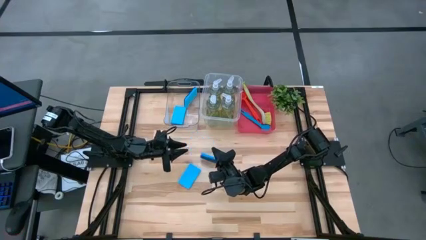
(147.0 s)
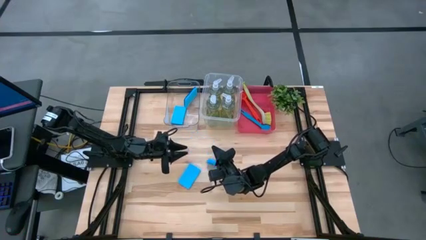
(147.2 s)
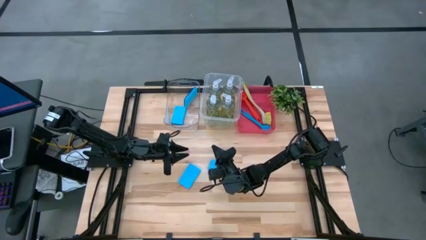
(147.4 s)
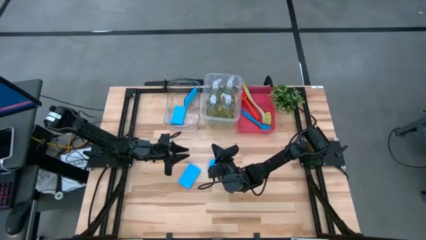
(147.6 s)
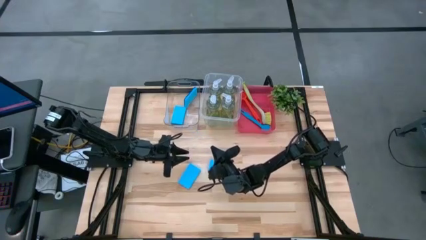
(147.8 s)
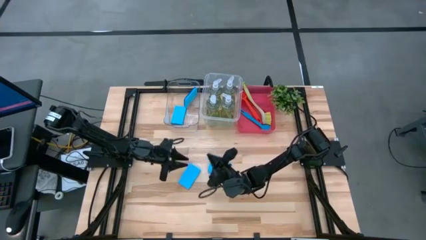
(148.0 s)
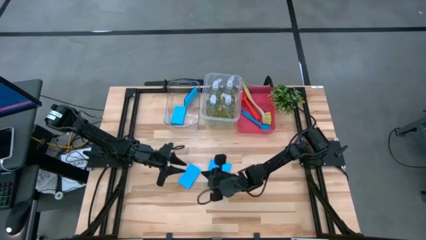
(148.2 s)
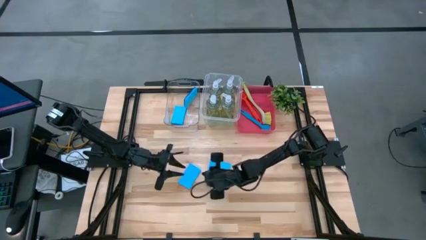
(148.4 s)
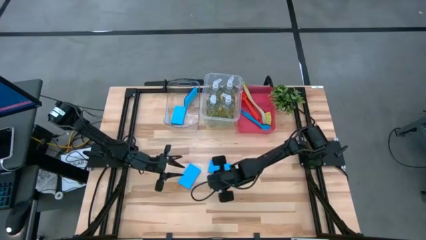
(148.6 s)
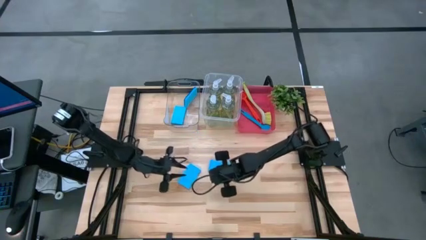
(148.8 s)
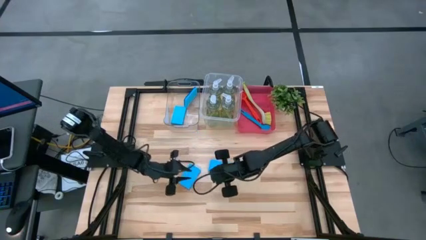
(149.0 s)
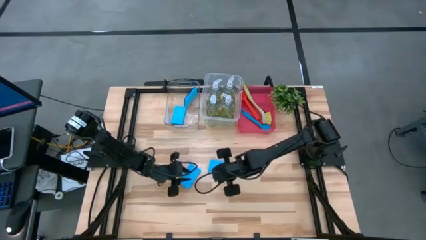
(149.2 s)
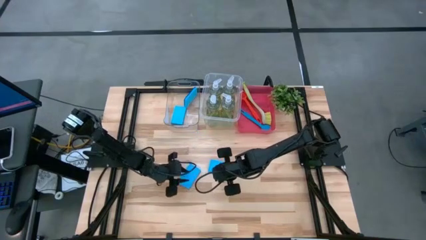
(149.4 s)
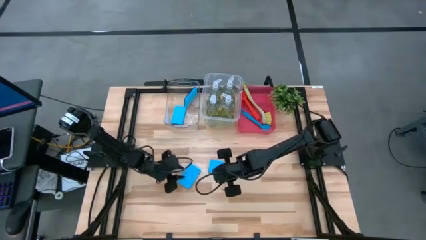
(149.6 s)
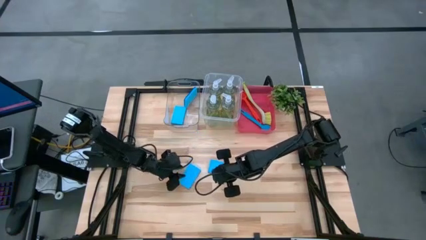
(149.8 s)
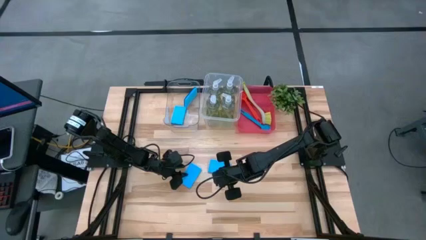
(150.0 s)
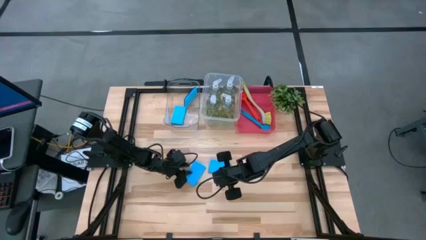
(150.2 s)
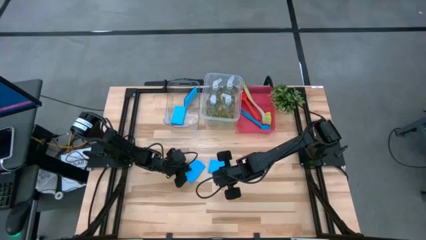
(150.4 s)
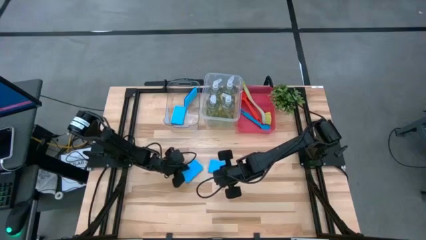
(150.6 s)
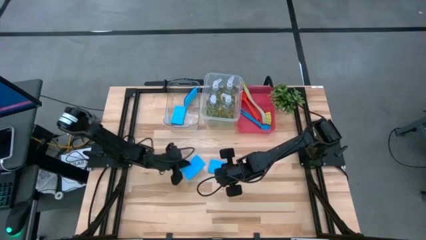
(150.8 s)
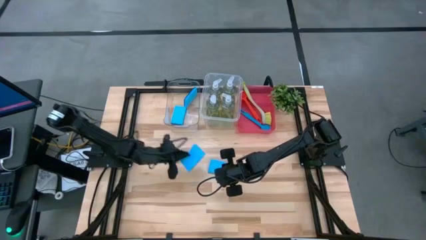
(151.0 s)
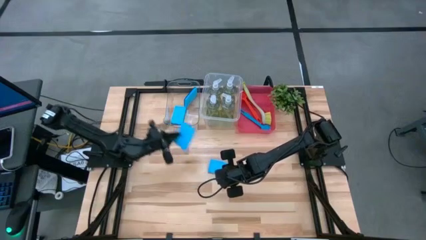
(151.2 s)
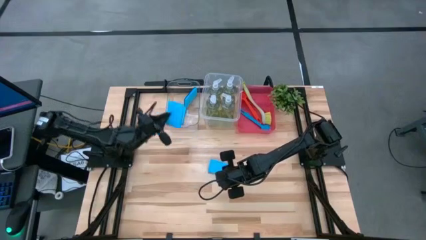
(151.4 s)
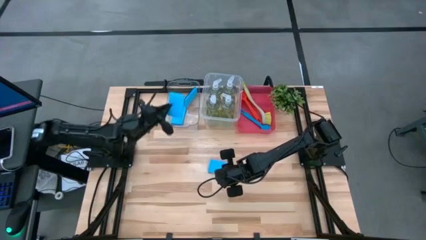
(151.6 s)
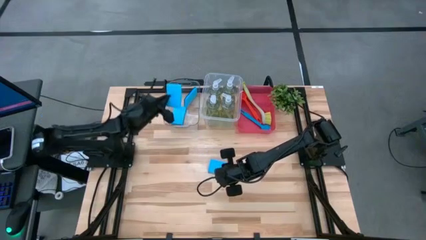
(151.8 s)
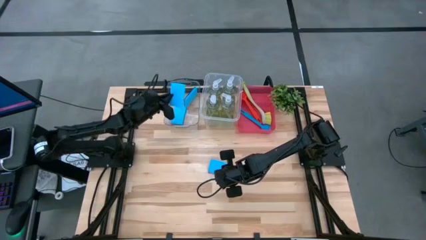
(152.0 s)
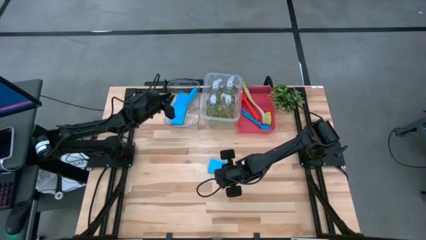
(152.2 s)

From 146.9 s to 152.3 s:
Task: Pick & Place Kitchen Sink Supplies
Put the blue sponge into the transparent bin

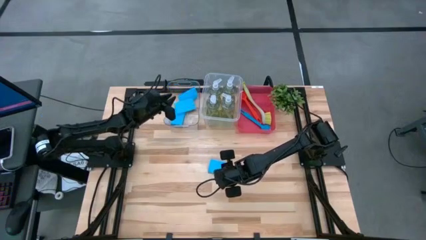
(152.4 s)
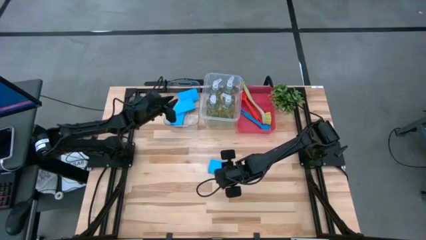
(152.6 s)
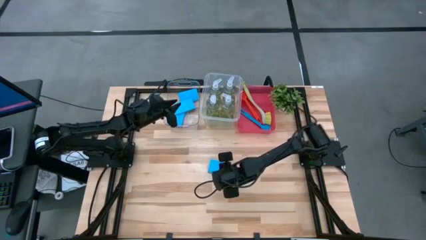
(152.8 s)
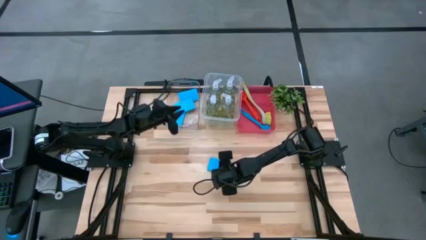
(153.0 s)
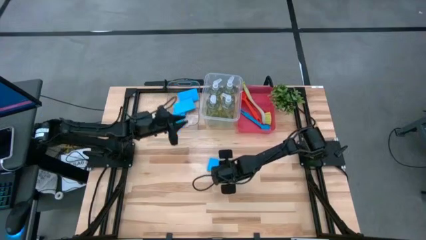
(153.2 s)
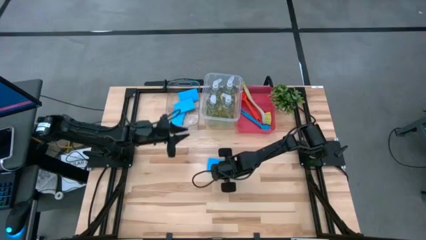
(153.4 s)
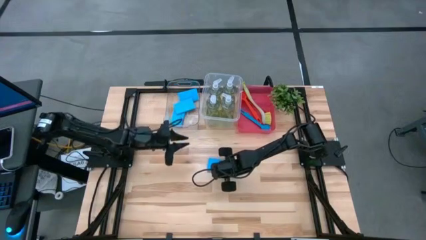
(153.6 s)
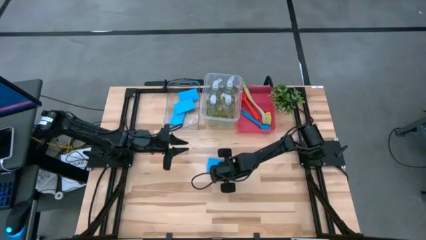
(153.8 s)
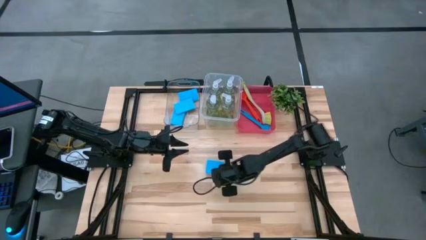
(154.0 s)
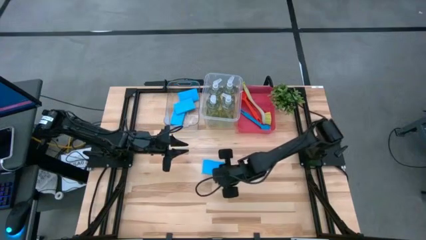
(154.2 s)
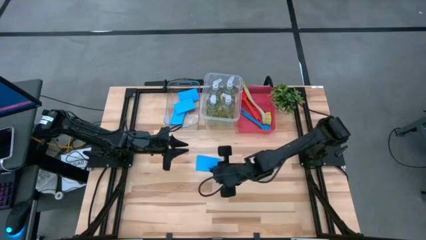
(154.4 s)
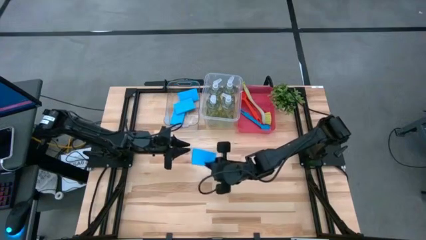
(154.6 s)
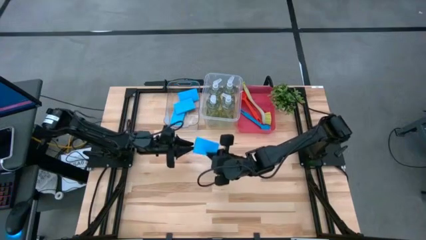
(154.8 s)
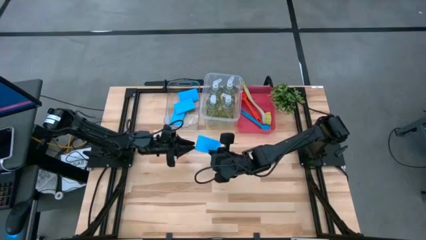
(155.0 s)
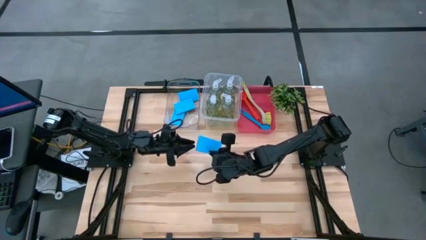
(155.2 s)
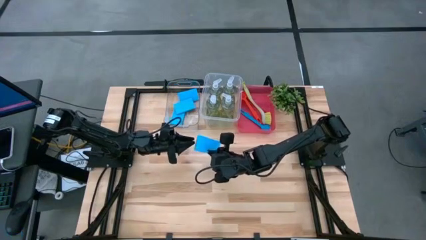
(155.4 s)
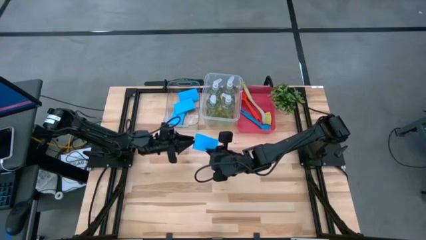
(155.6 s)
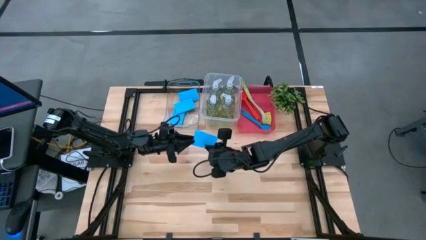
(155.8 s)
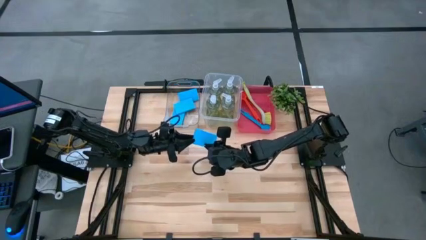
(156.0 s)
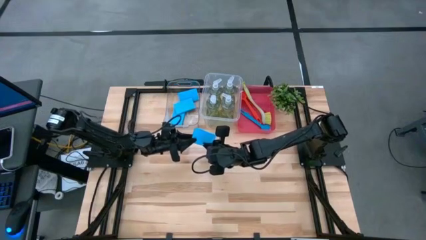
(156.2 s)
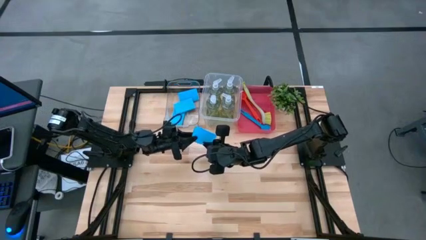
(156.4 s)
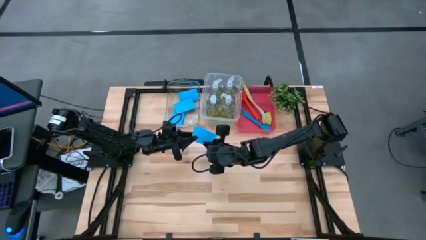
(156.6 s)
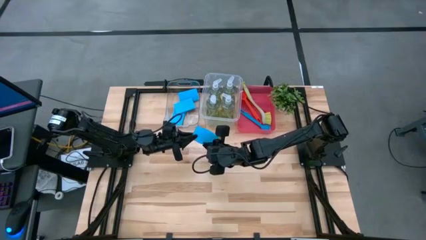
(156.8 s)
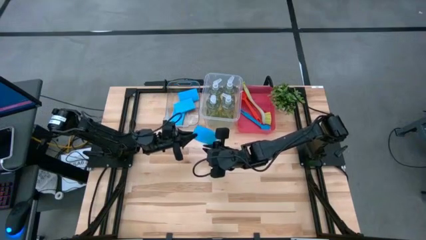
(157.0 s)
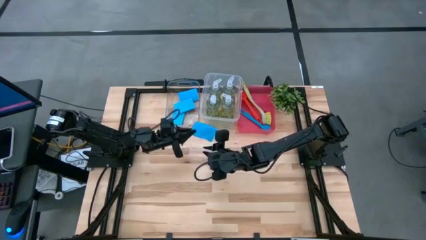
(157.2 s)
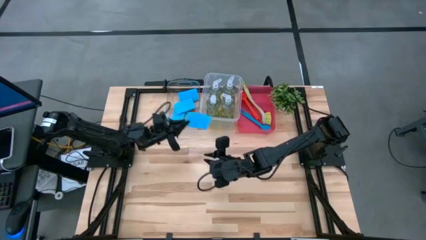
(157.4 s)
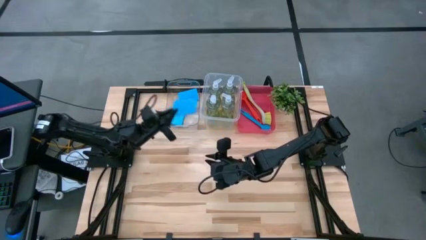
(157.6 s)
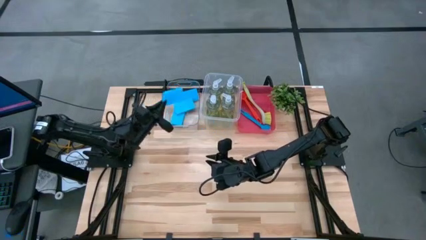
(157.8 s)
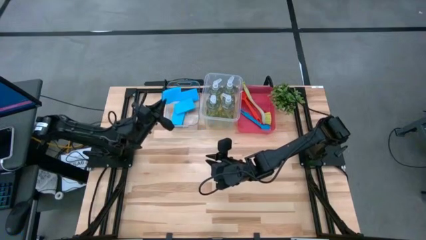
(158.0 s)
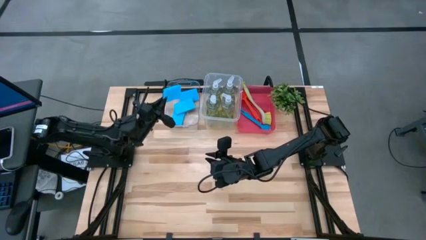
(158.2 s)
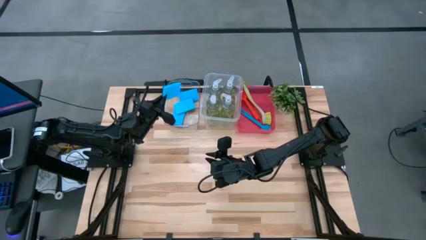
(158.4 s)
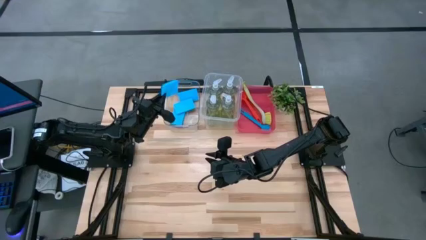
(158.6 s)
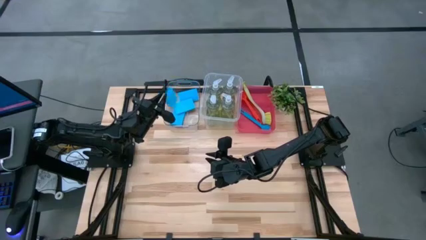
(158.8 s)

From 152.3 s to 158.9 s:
Put the blue sponge into the transparent bin

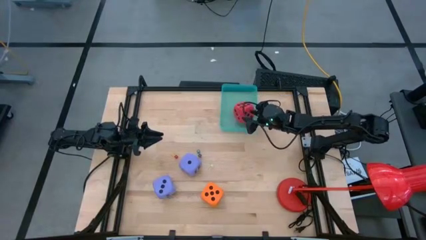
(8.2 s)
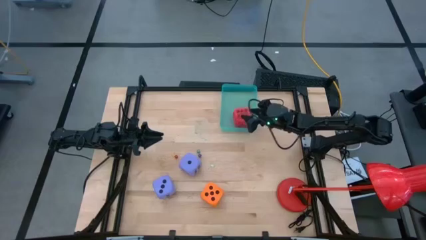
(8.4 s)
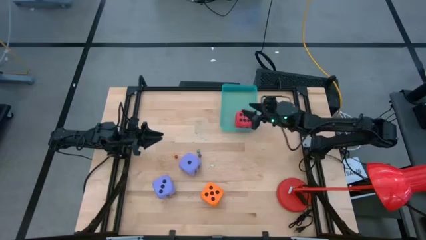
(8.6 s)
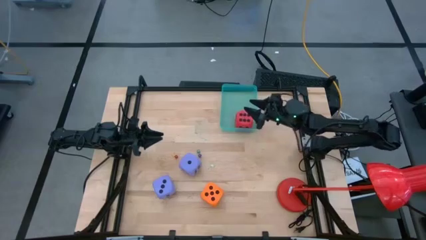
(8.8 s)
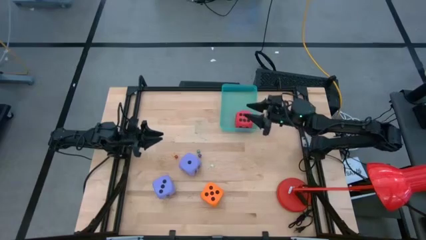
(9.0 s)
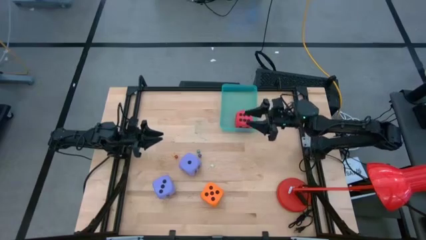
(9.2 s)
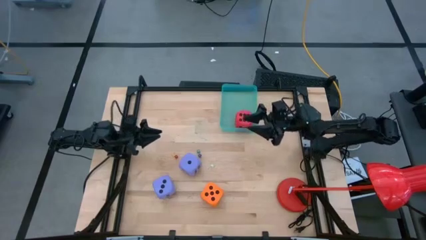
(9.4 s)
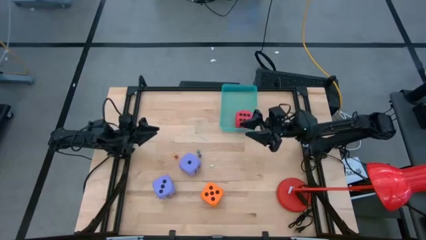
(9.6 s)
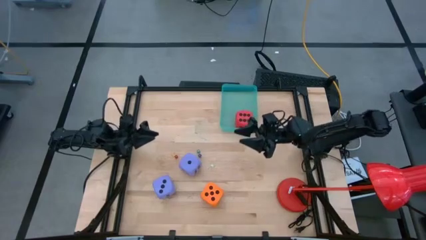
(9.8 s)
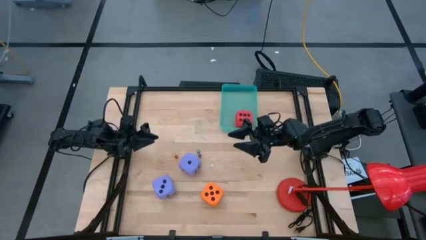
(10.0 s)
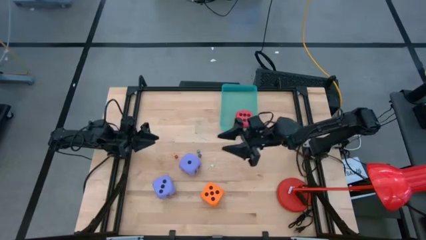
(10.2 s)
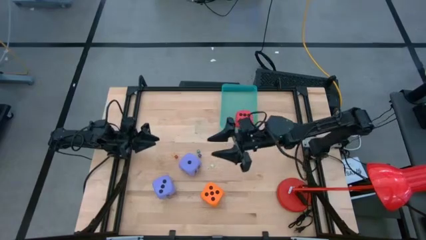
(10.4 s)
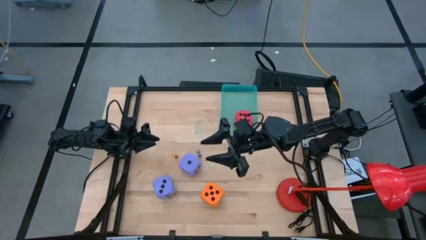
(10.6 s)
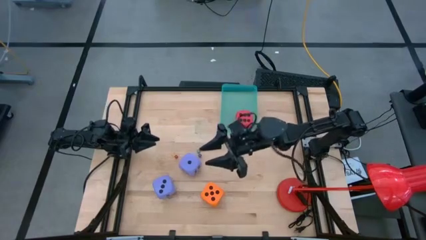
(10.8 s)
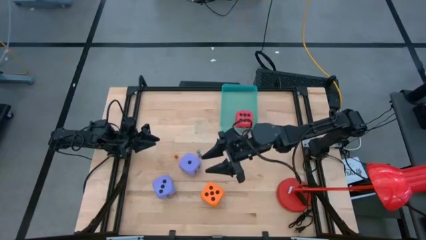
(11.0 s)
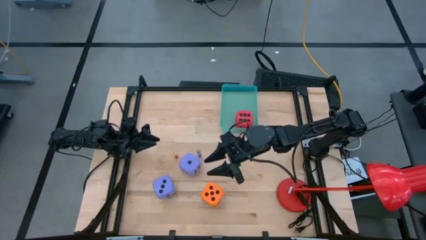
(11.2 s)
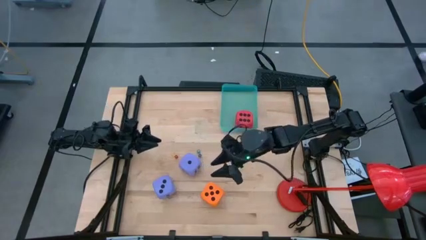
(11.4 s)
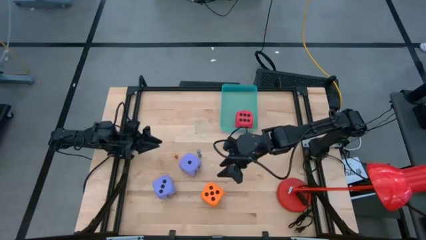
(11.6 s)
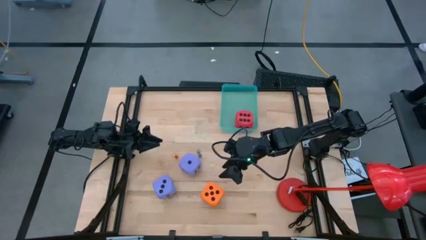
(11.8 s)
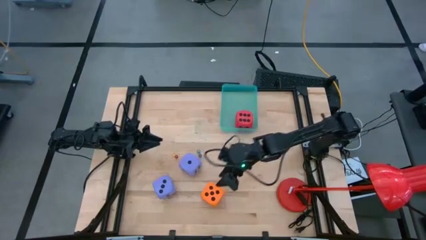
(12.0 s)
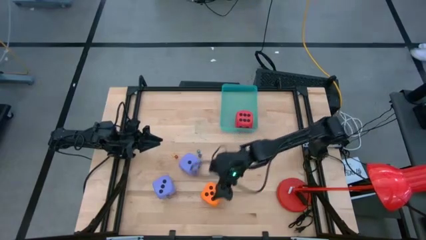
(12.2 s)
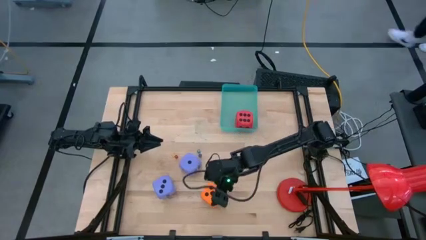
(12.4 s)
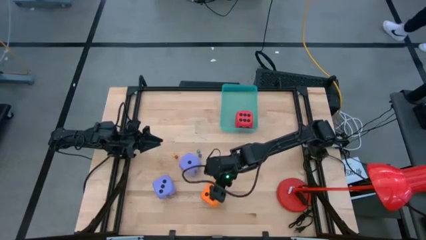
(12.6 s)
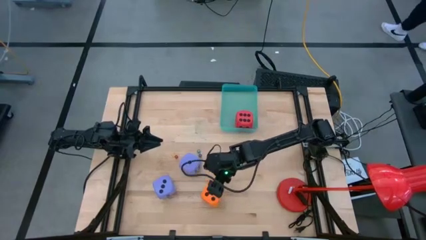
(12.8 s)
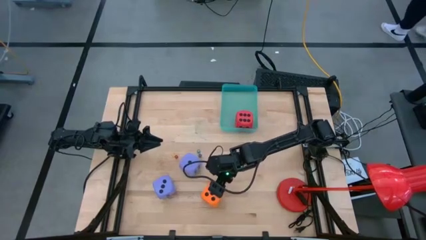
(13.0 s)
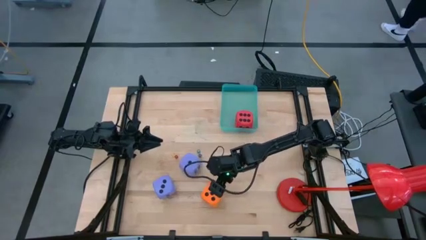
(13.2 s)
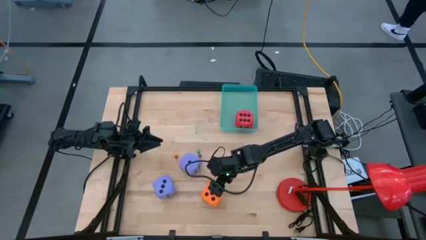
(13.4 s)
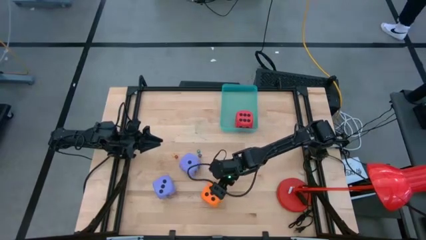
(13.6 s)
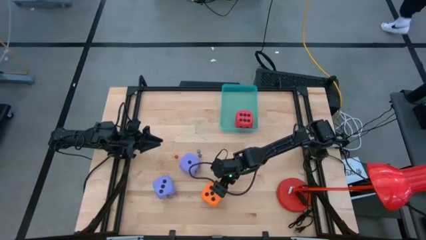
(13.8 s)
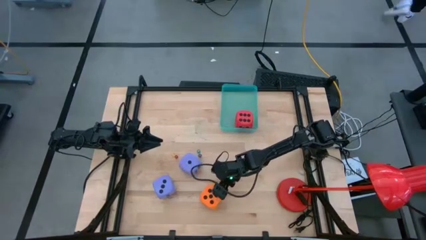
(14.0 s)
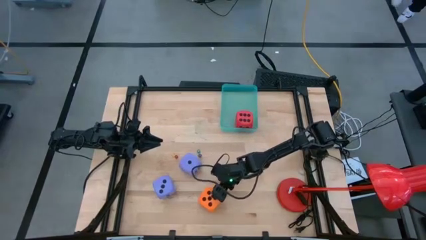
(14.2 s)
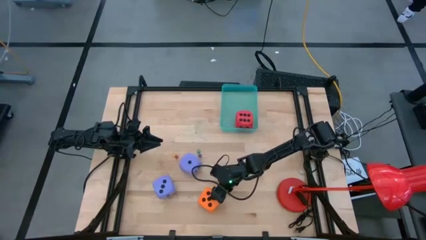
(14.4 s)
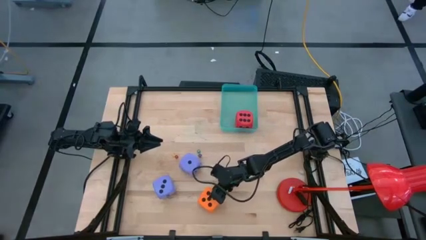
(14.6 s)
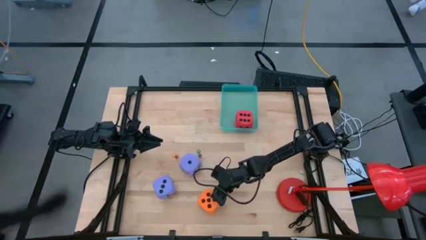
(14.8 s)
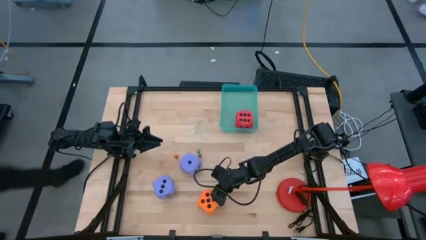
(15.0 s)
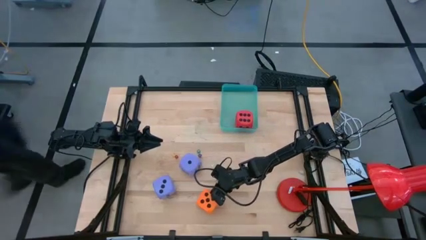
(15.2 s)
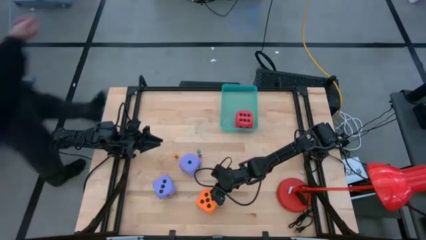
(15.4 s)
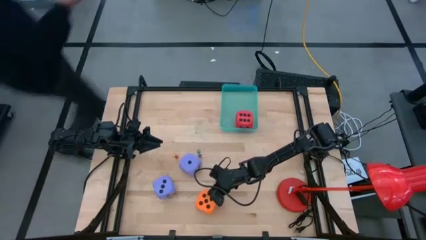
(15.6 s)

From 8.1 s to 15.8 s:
Task: Pick & Place Dice
Put the orange die into the green bin
